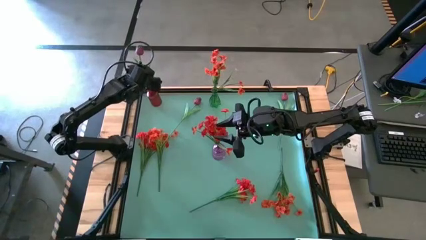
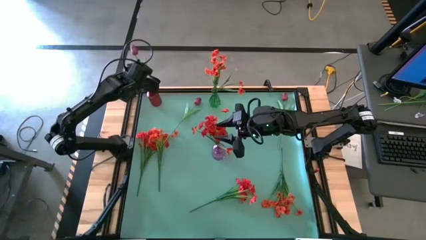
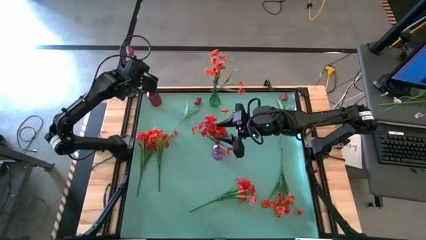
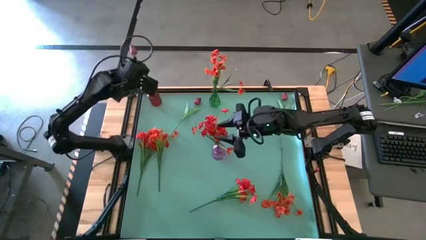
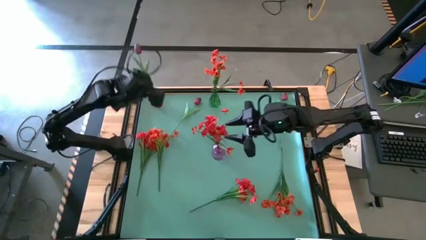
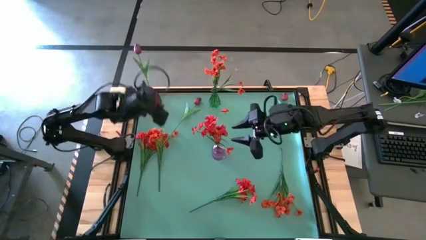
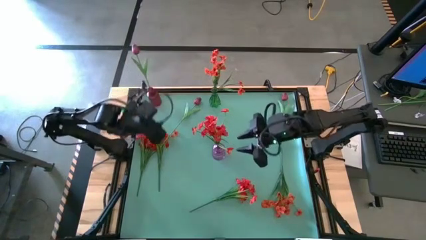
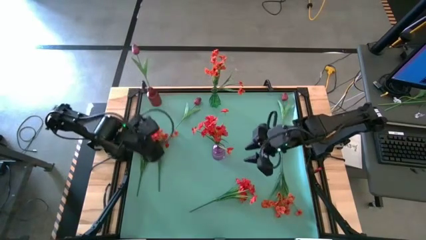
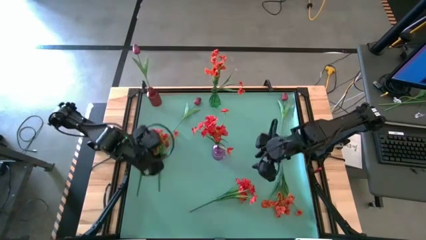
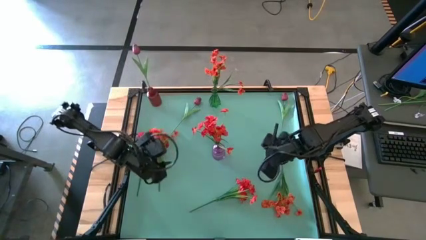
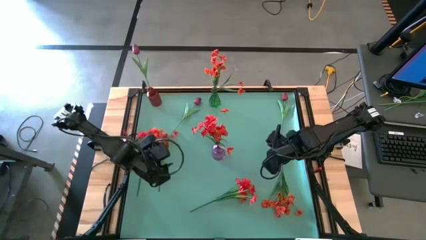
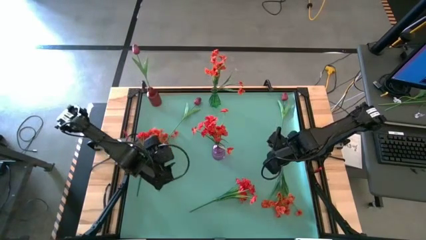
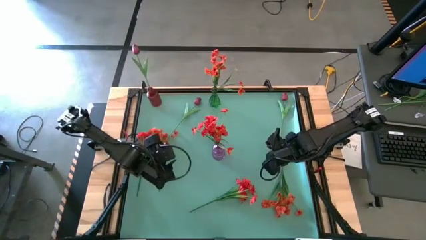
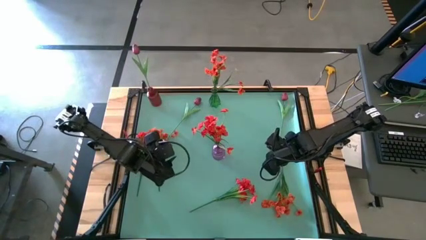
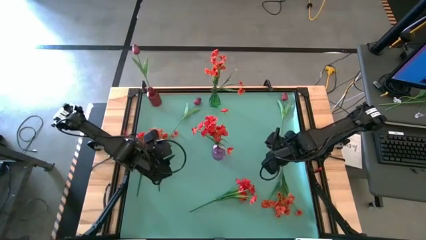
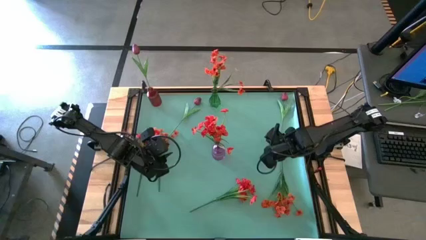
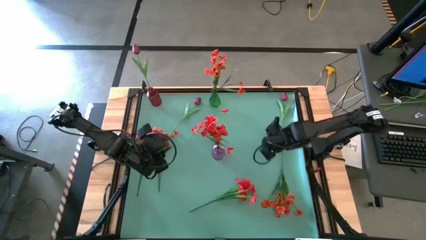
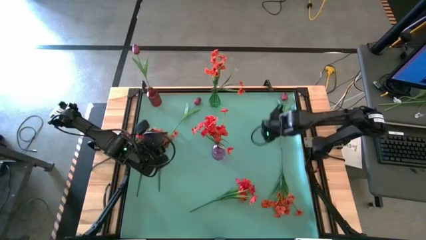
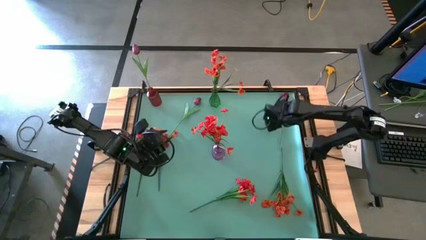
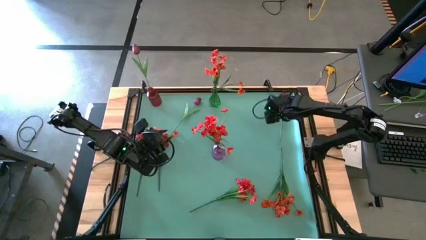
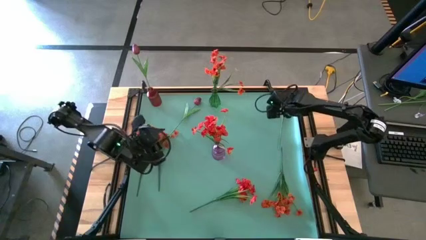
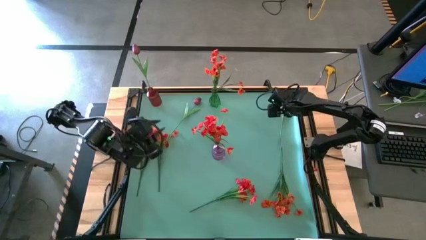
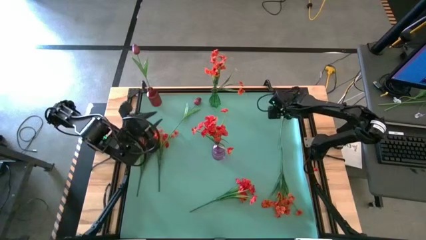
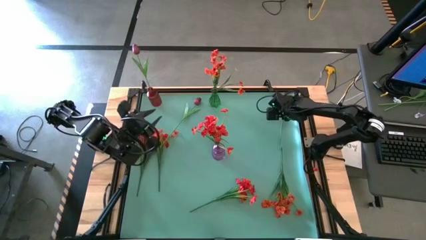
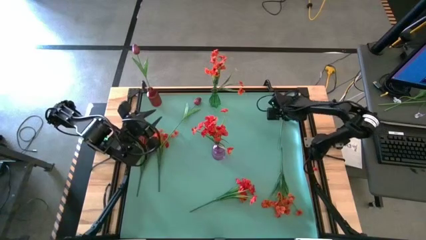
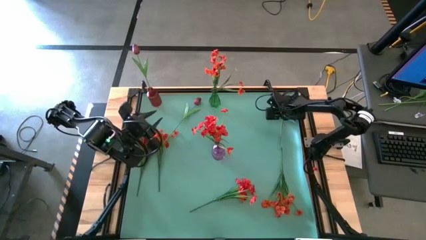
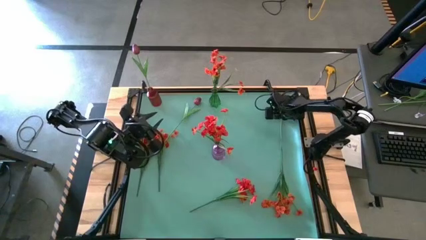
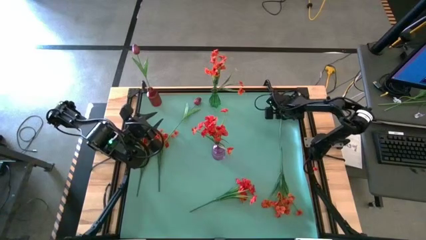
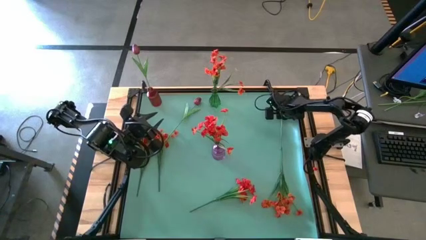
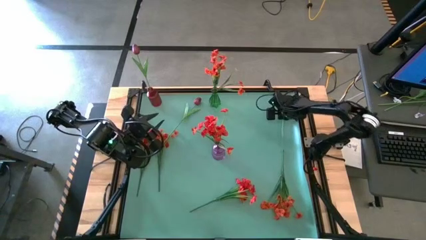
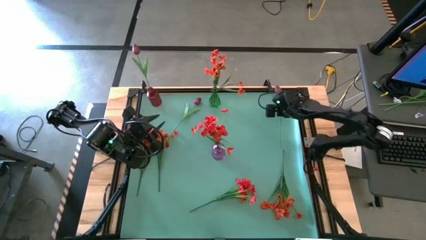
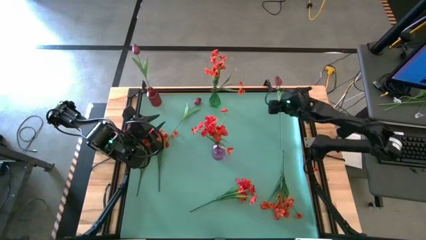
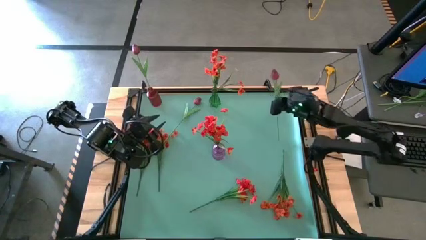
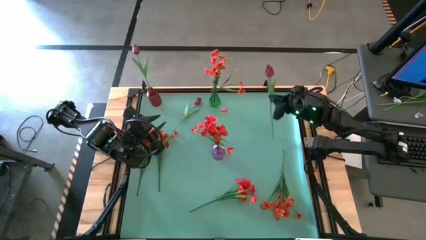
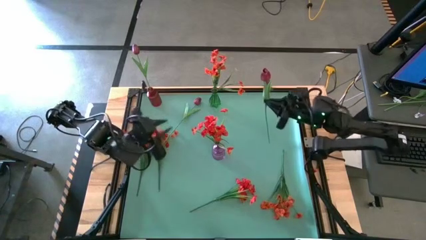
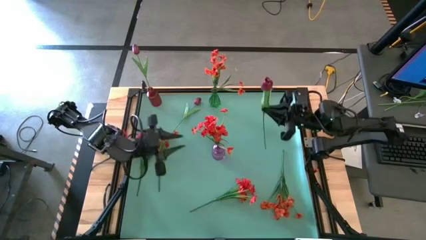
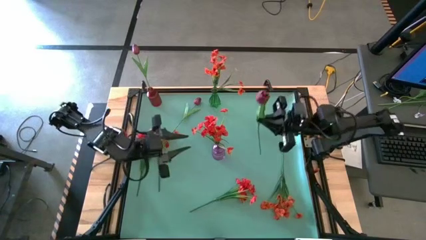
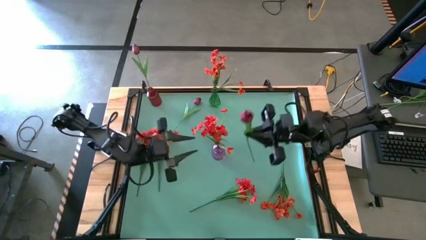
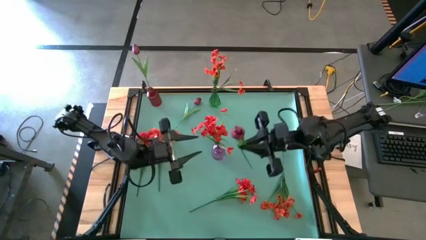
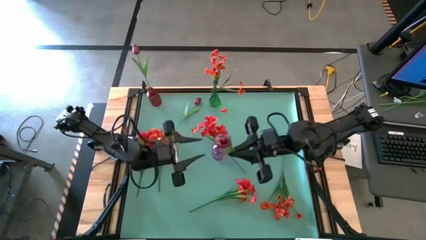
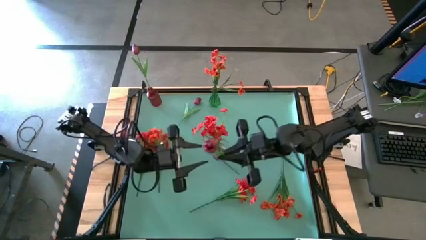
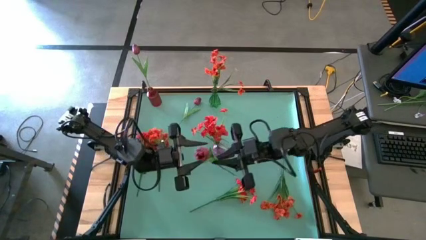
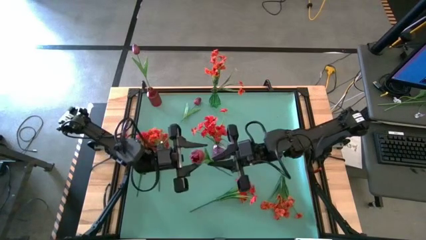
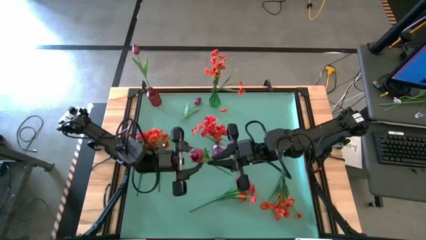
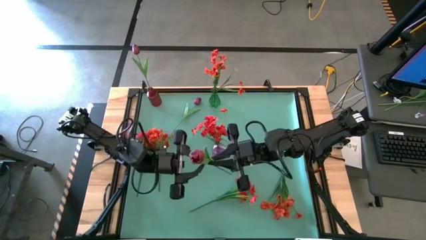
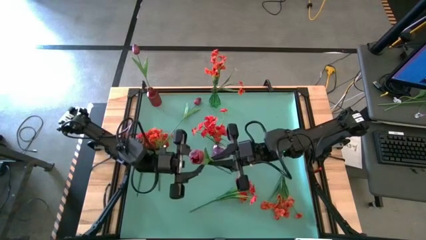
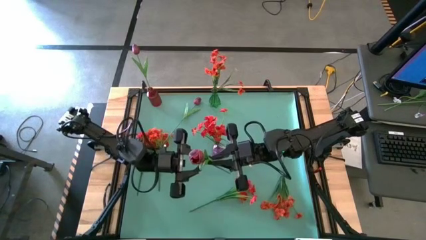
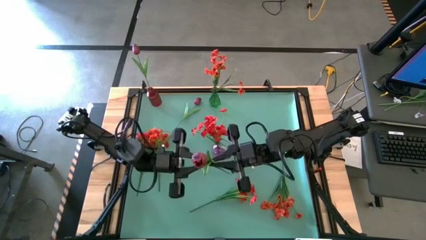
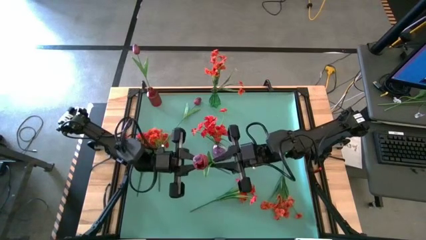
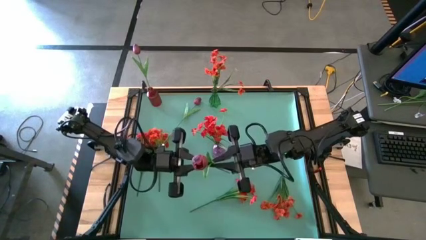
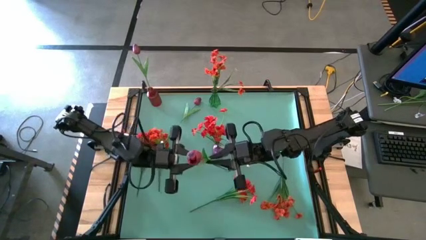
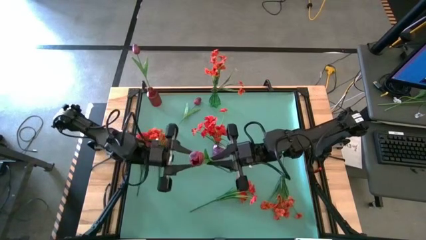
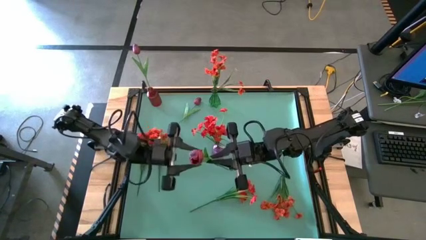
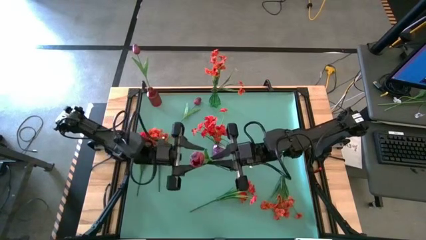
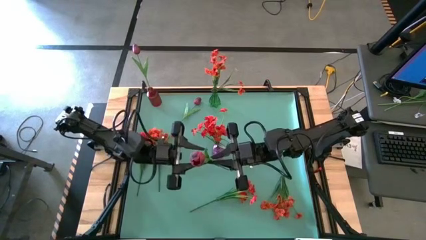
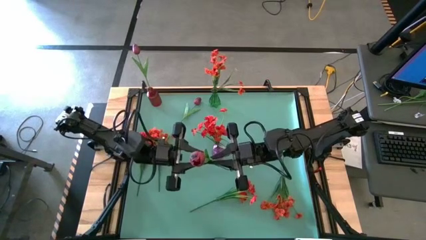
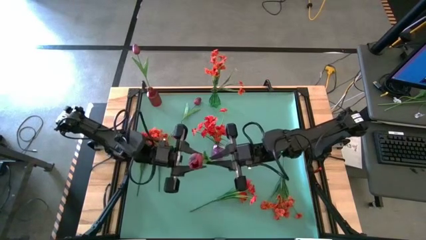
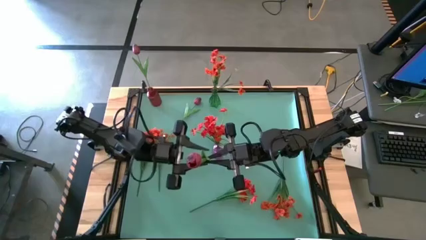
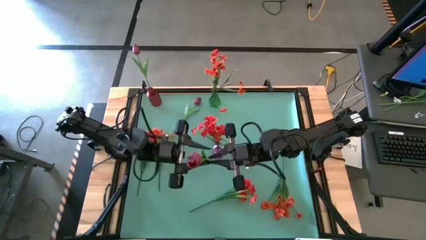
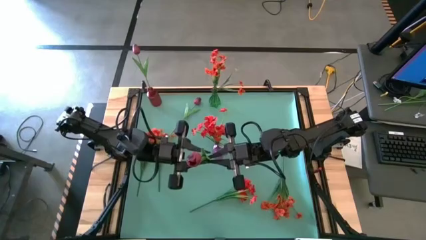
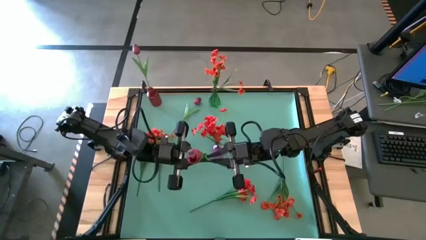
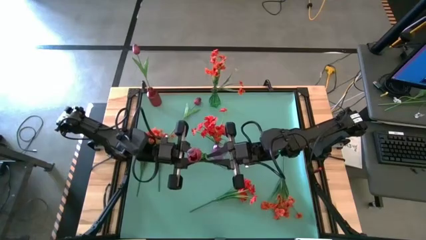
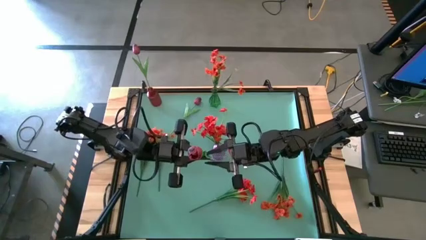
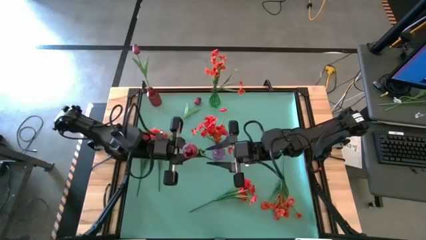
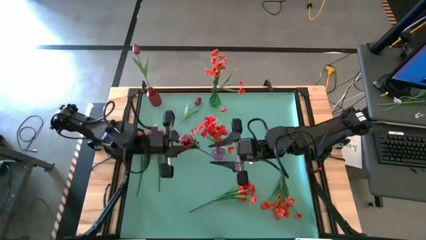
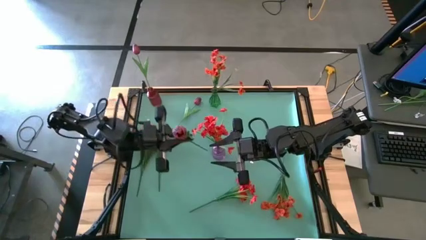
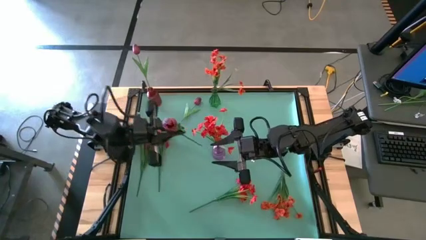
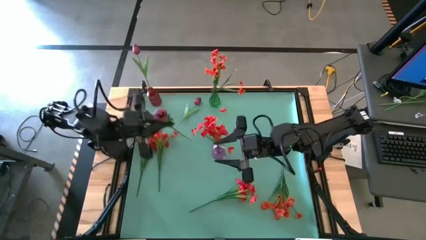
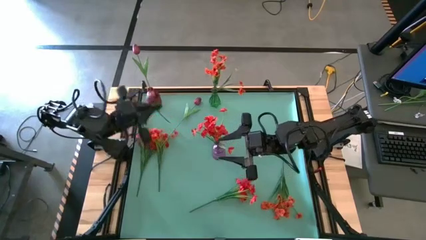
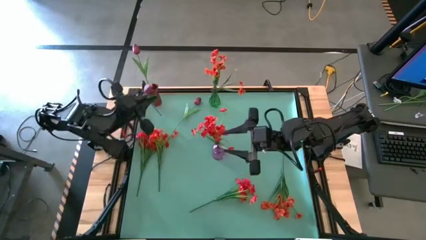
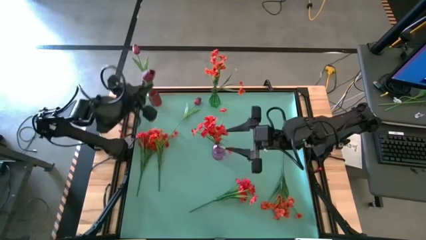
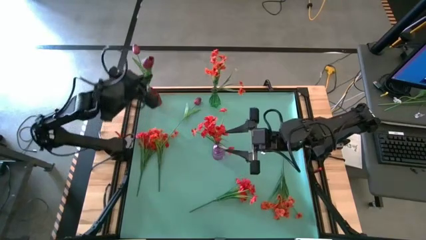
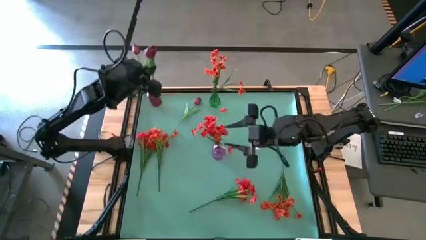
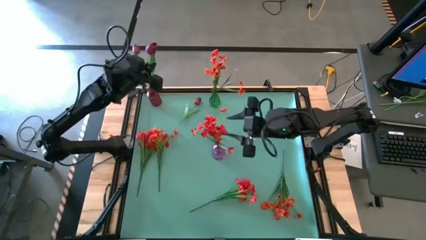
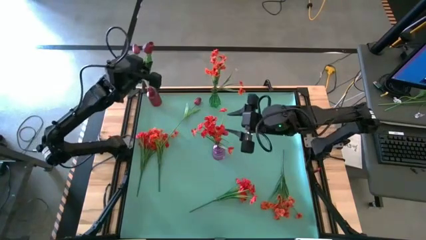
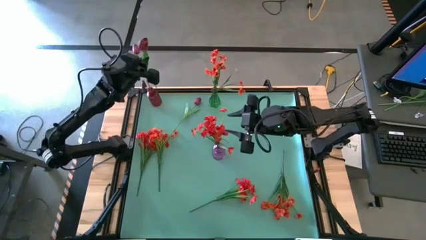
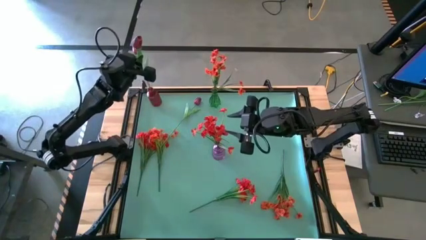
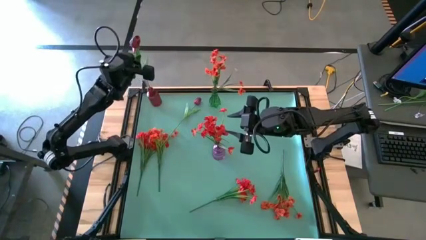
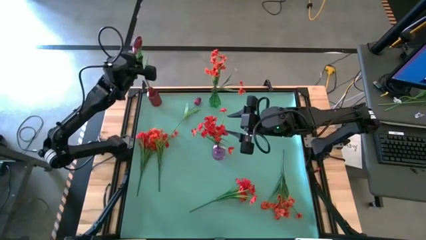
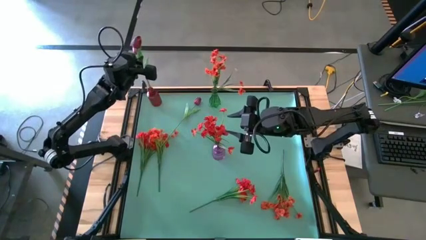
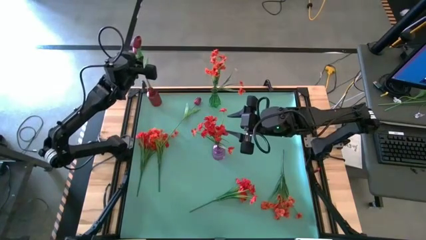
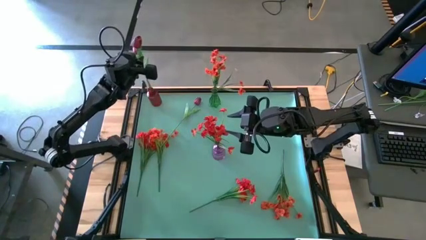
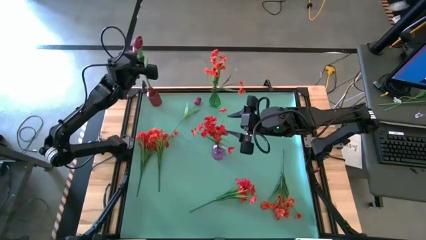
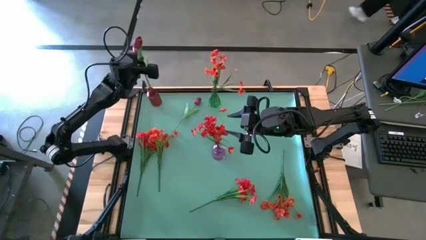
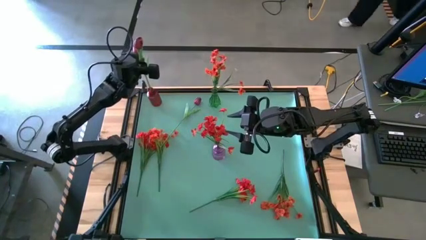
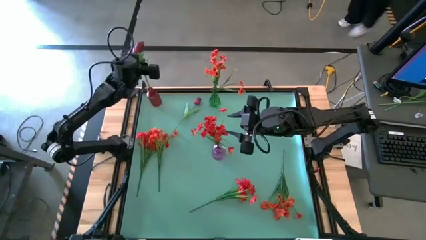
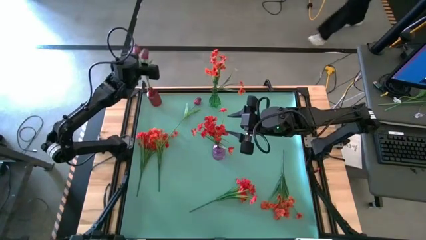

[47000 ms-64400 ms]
Task: Sort flowers into vase by color
Put the right pink flower into the red vase
